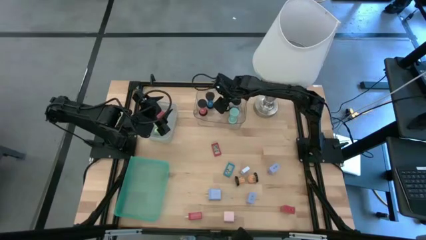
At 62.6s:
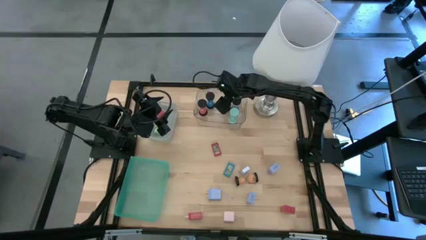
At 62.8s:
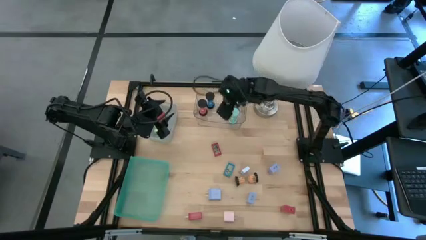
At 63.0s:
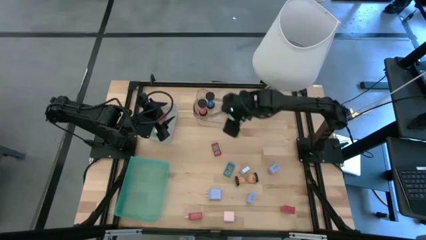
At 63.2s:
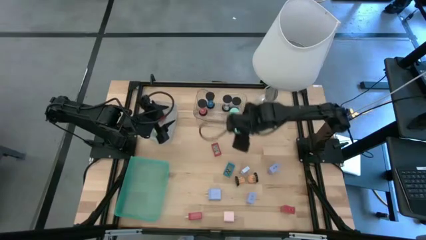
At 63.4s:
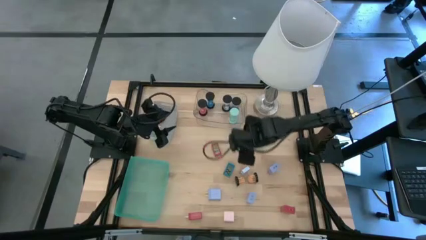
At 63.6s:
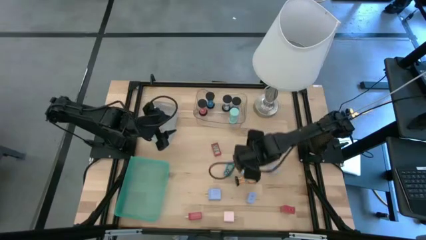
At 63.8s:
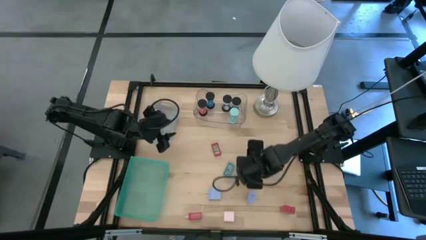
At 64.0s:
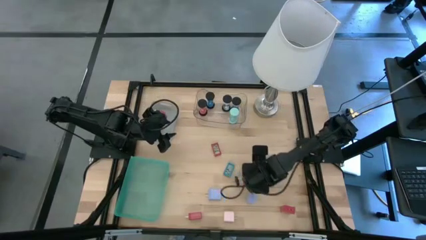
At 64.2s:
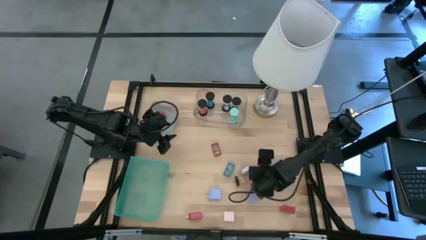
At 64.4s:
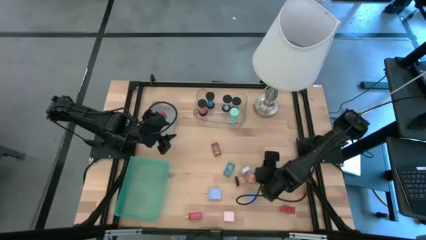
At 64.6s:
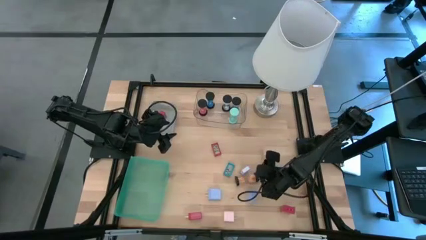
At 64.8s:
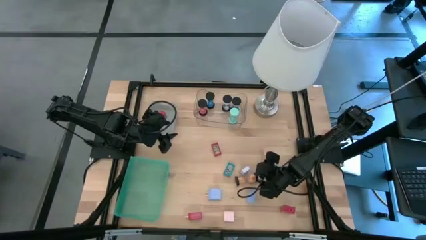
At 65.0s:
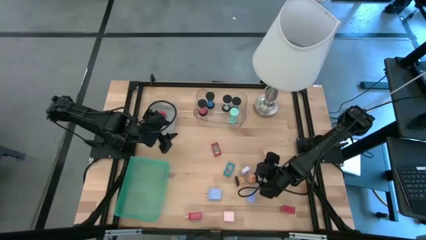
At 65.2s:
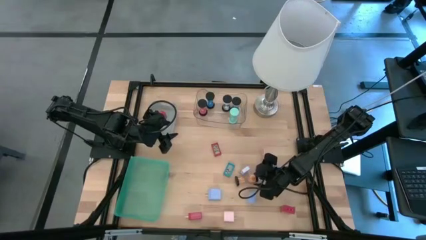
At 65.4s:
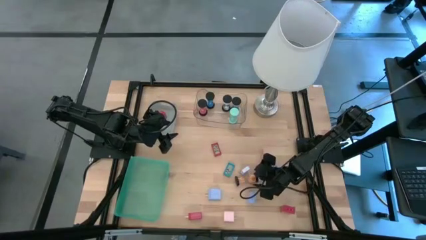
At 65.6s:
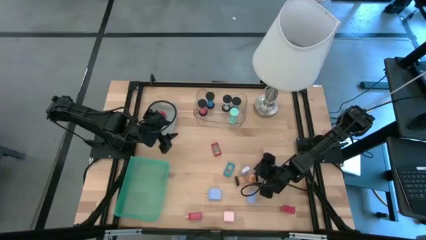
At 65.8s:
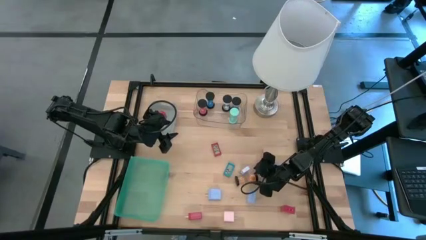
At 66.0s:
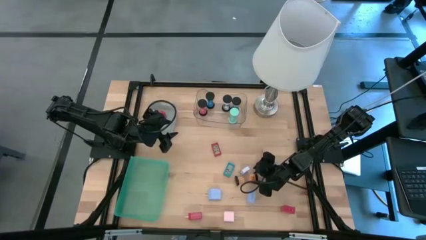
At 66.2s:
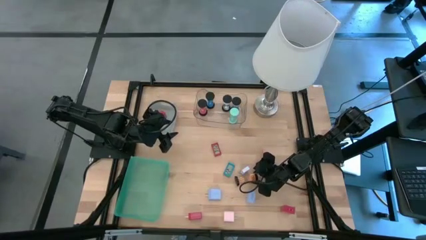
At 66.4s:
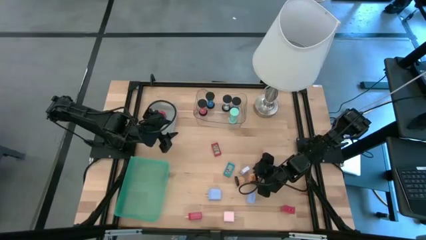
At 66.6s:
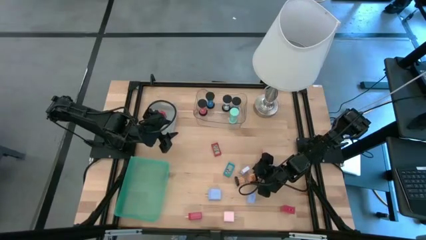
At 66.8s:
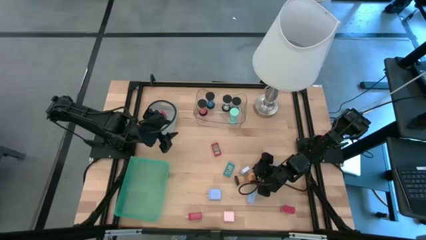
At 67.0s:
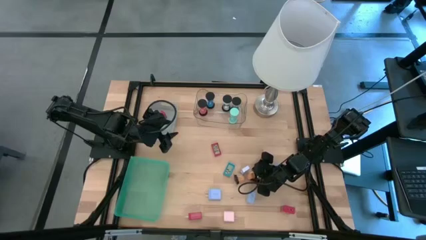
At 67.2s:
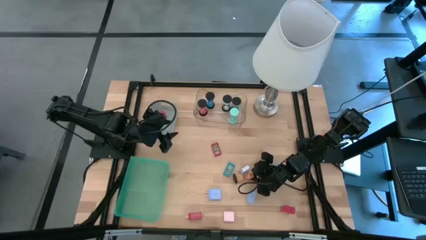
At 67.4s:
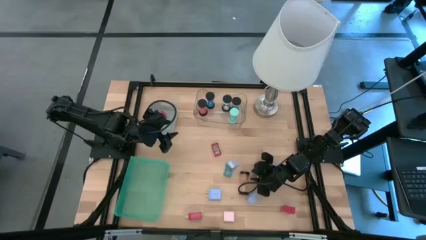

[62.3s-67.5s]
Task: Pick & Place Office items
Put the orange hourglass into the transparent bin

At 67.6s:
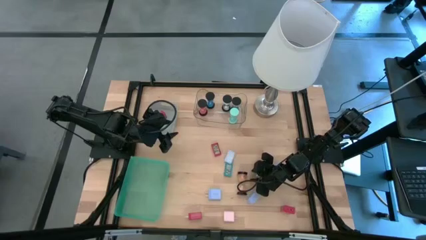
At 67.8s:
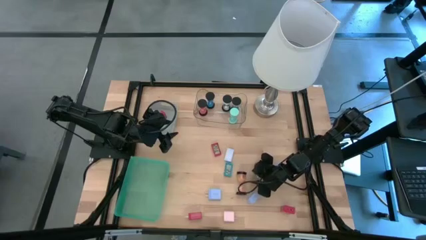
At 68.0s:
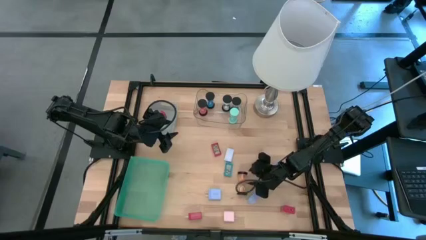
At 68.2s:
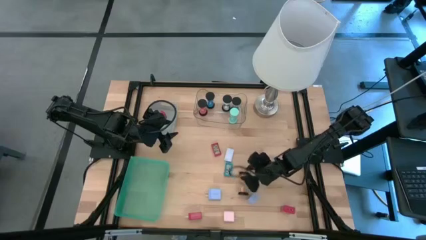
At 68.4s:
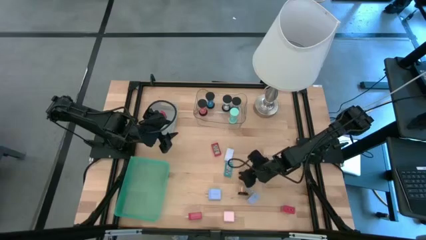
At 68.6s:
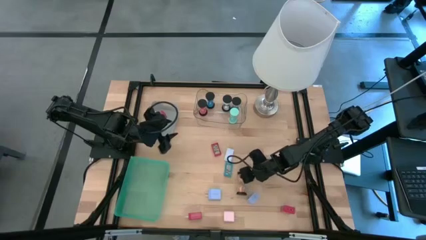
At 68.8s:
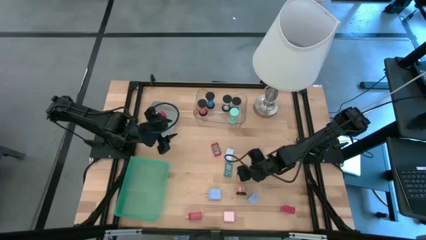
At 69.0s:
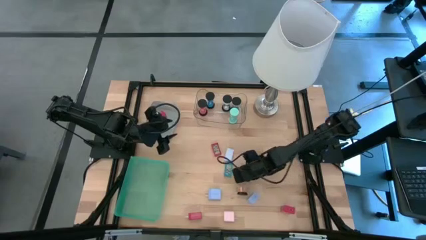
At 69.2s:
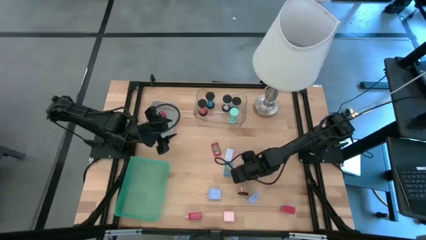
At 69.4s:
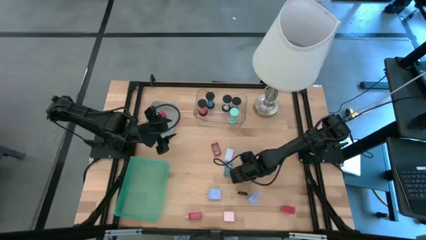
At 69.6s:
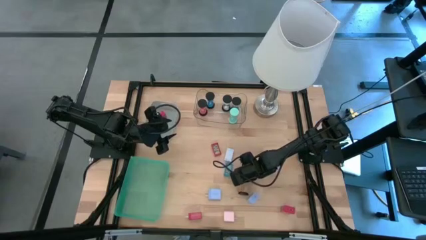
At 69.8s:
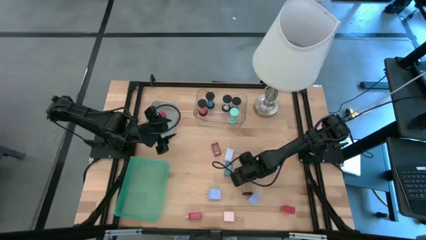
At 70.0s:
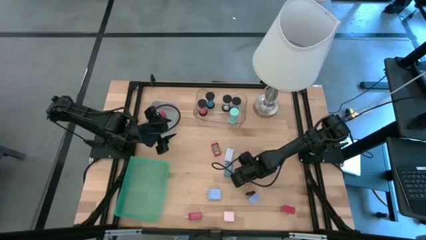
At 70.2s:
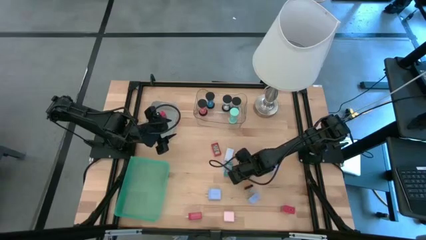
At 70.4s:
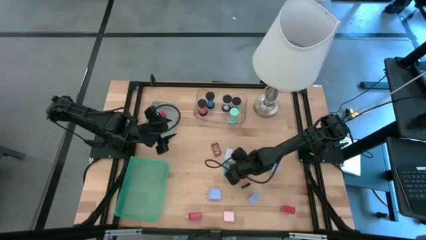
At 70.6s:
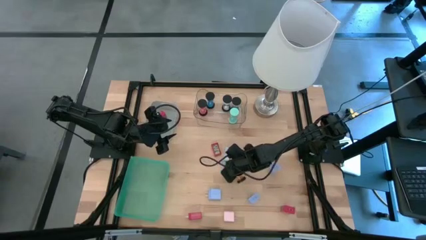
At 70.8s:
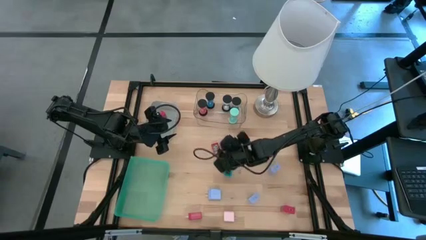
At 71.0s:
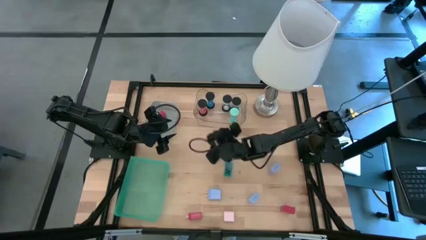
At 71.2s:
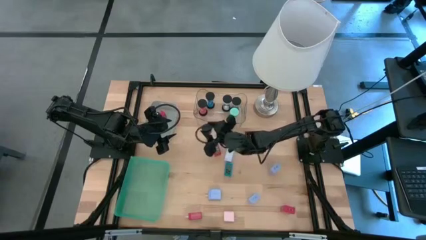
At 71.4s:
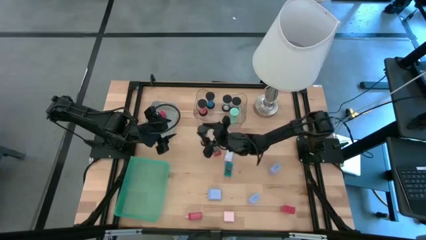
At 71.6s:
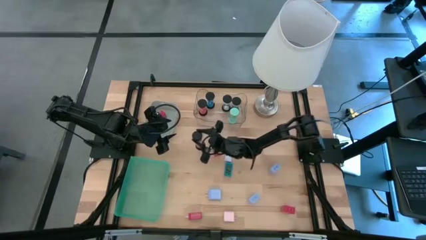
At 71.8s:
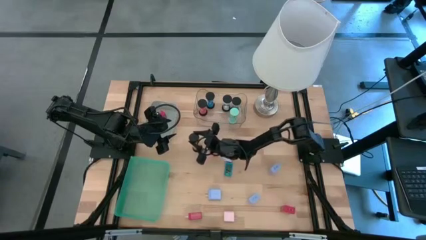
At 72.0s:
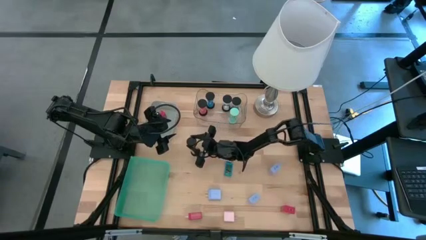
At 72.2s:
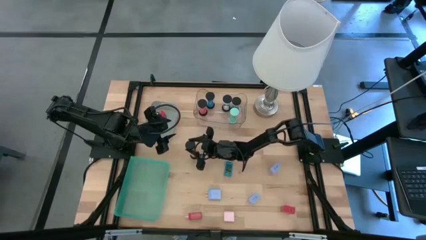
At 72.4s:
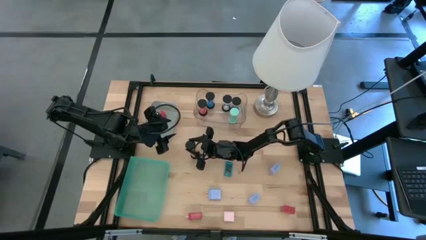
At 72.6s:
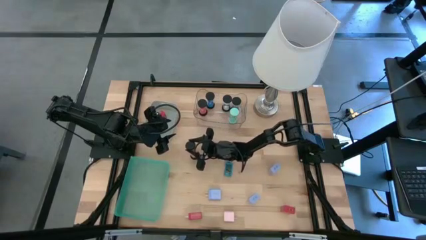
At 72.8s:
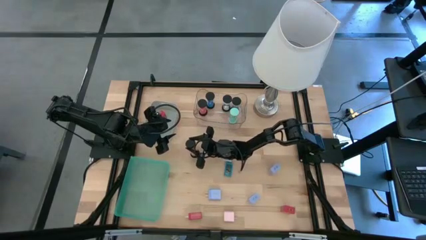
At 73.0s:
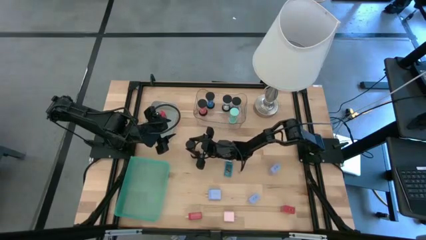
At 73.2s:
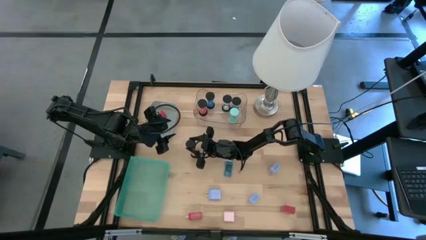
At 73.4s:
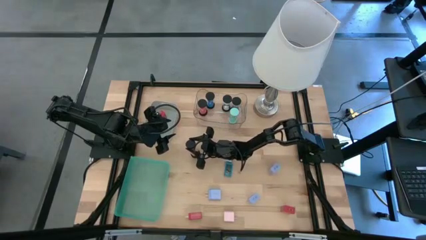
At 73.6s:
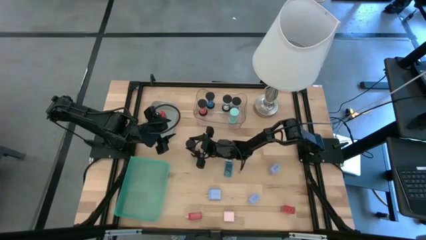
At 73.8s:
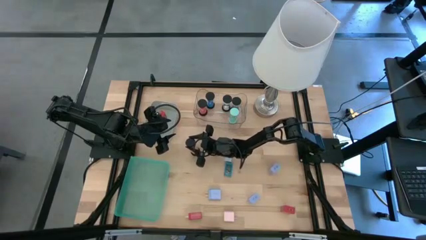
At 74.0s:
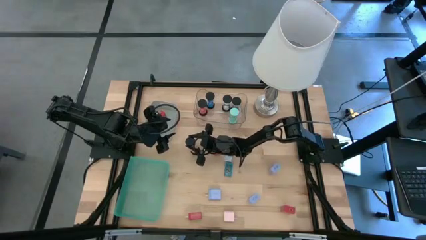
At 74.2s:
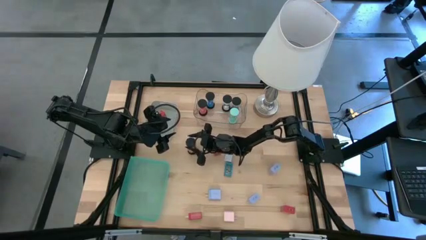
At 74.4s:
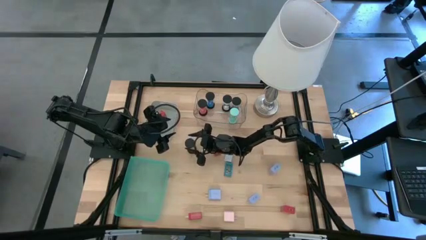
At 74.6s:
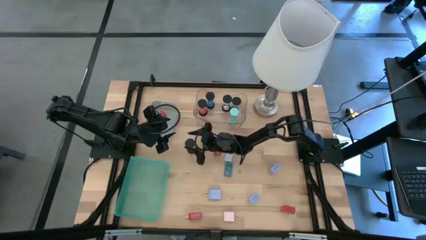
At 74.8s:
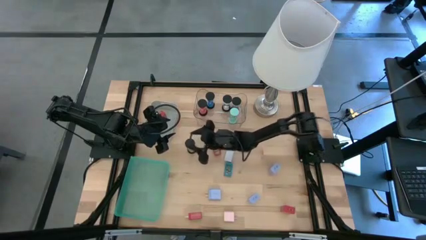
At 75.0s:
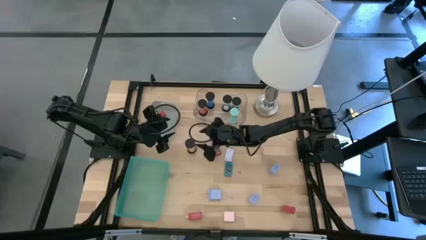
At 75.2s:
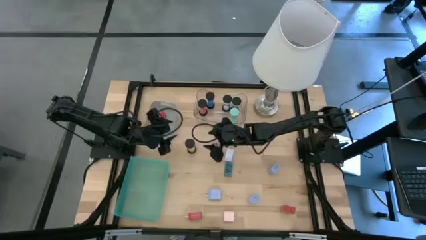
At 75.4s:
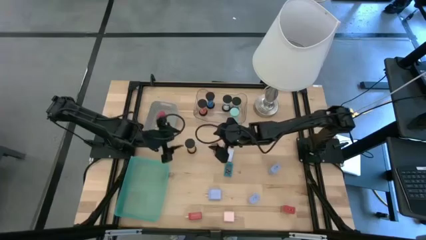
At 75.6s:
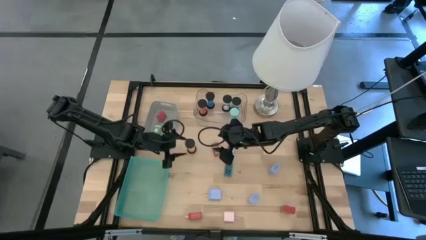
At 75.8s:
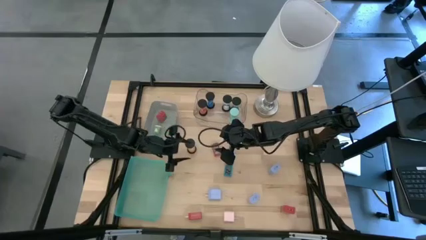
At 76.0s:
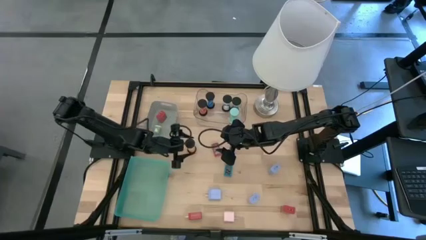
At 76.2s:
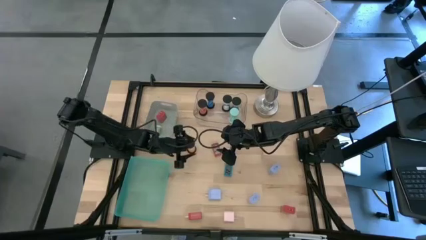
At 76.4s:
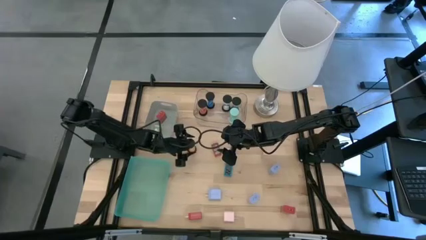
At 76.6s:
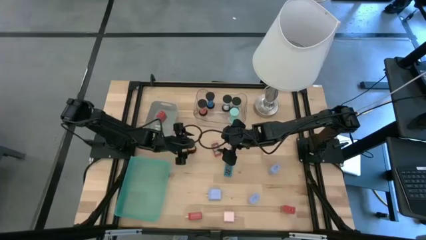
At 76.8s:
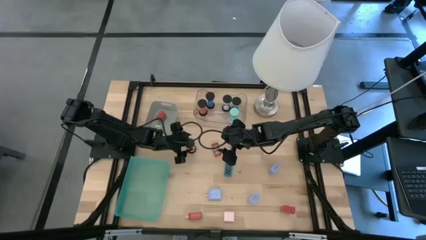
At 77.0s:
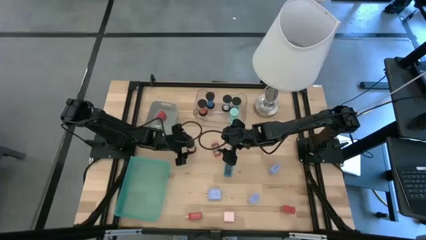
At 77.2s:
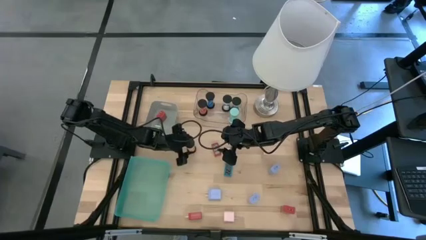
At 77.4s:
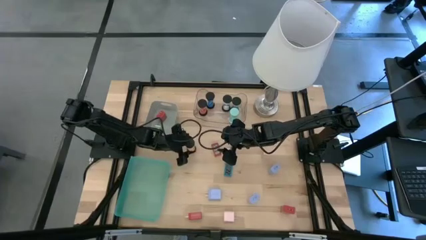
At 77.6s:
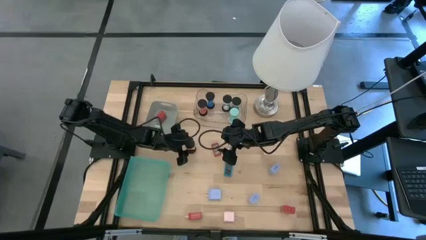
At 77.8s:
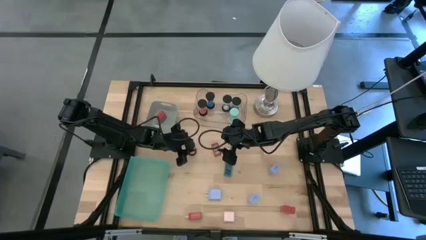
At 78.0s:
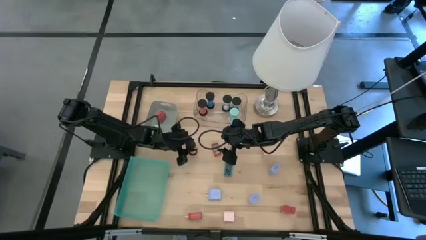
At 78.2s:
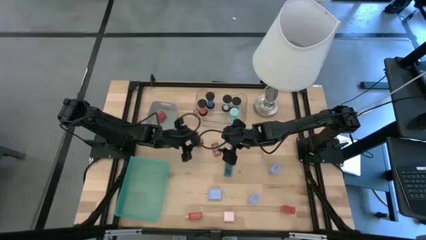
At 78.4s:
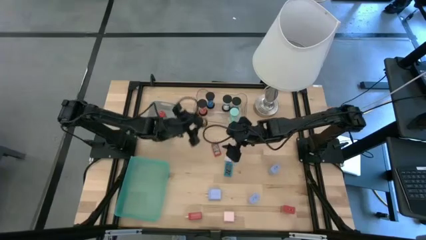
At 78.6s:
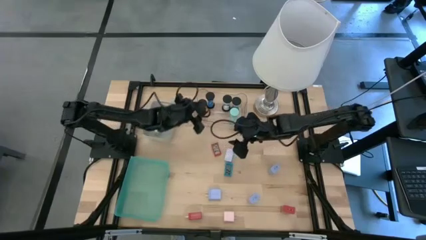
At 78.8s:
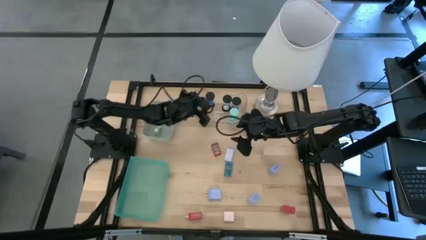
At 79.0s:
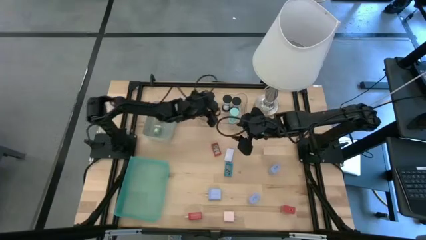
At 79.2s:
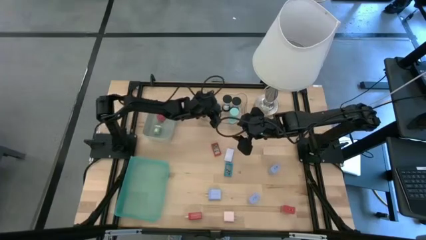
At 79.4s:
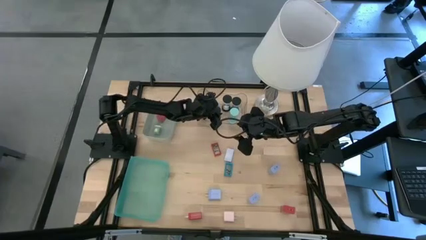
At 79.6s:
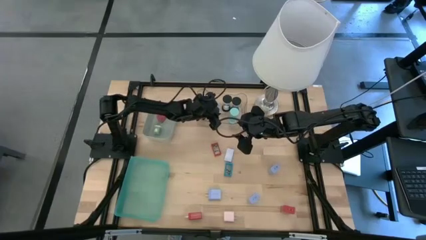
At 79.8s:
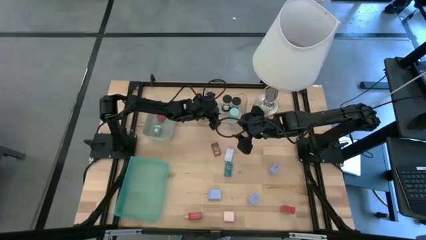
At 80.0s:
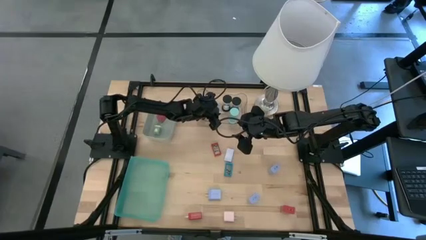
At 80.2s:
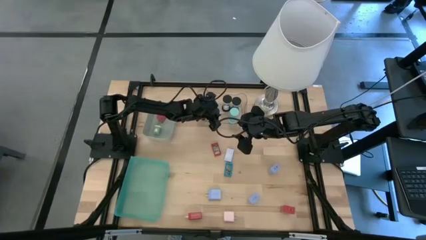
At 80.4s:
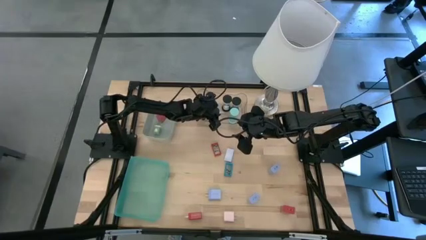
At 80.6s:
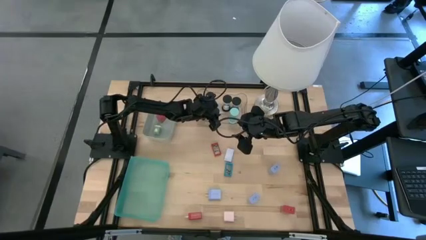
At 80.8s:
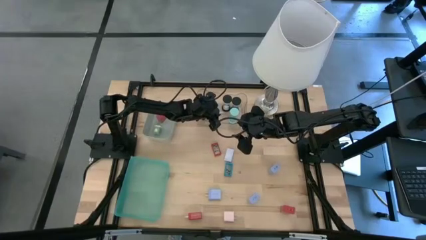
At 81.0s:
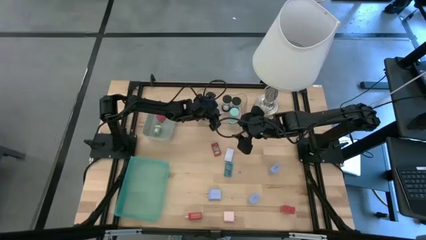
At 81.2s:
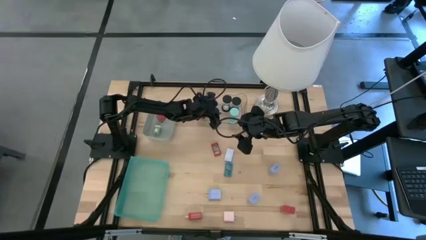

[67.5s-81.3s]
Put the orange hourglass into the transparent bin
